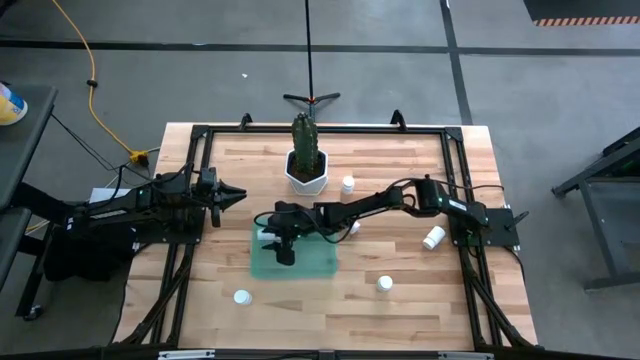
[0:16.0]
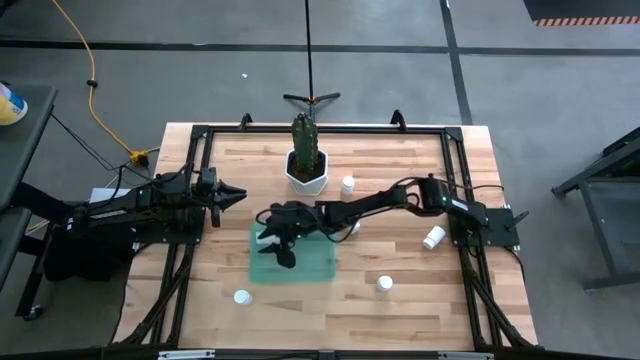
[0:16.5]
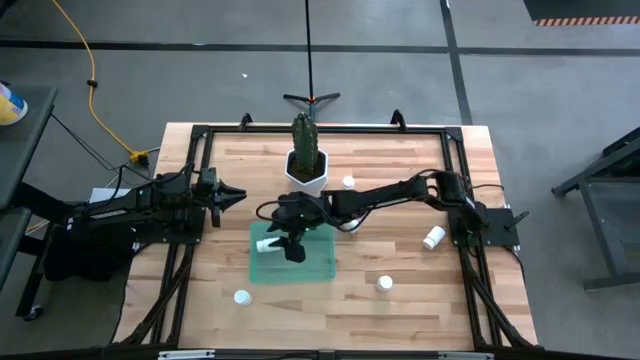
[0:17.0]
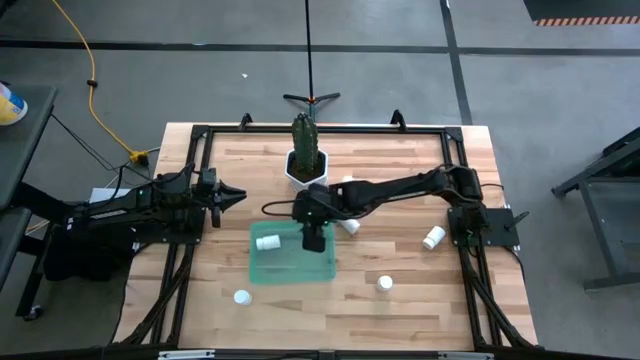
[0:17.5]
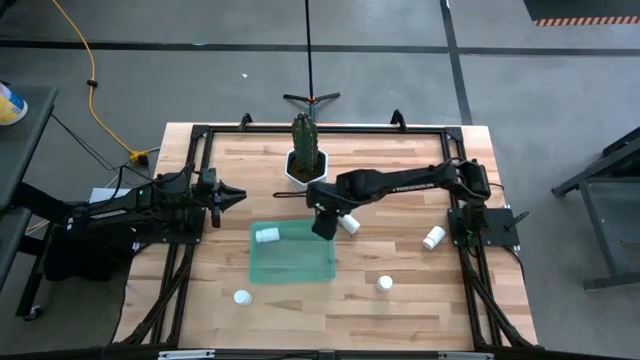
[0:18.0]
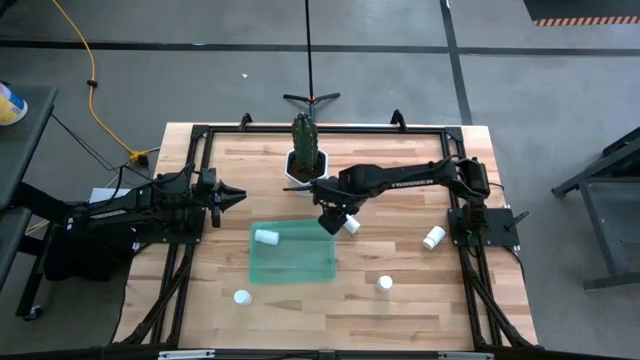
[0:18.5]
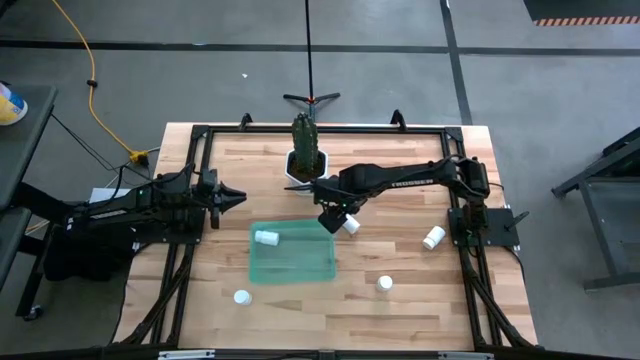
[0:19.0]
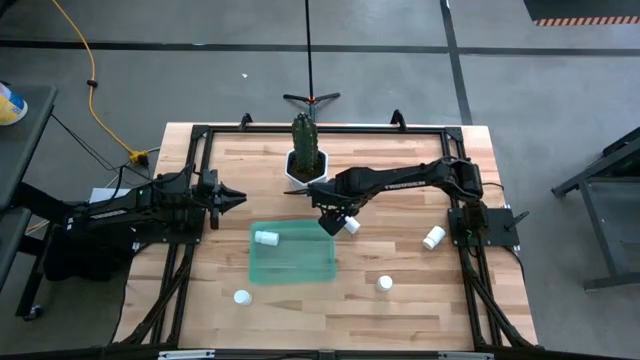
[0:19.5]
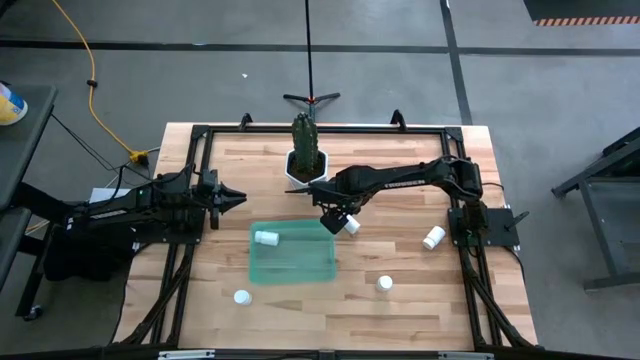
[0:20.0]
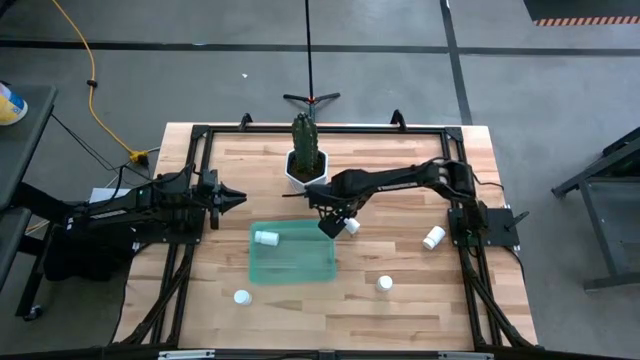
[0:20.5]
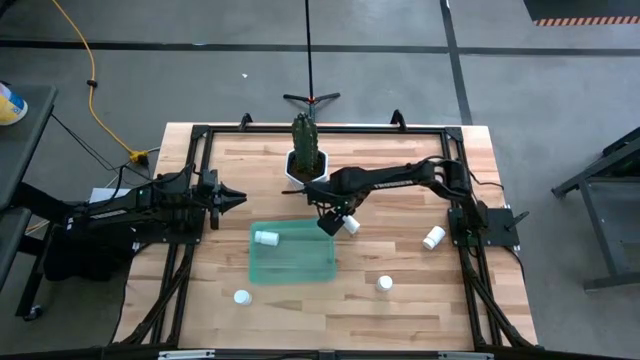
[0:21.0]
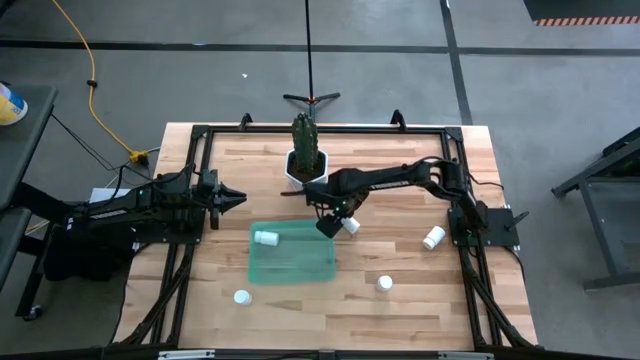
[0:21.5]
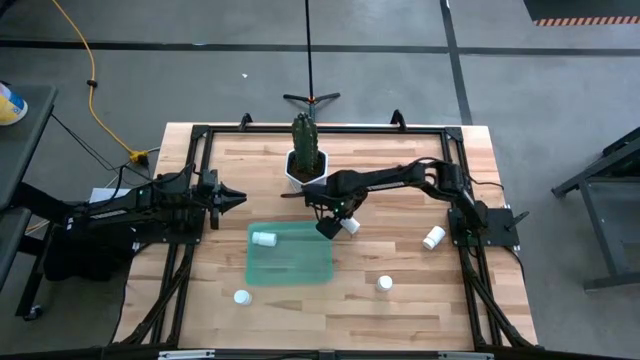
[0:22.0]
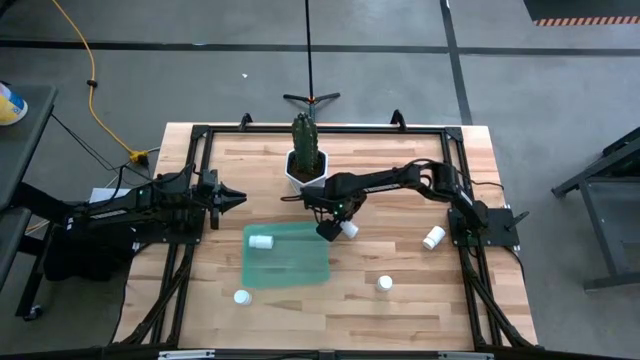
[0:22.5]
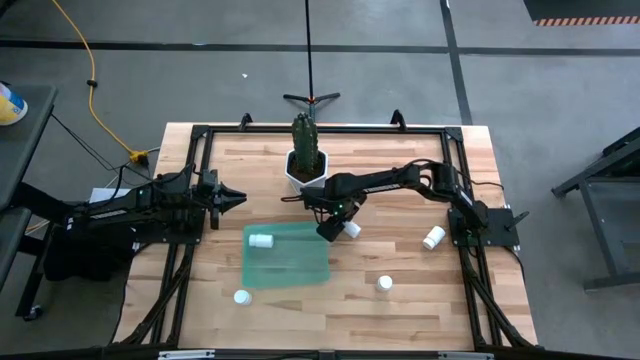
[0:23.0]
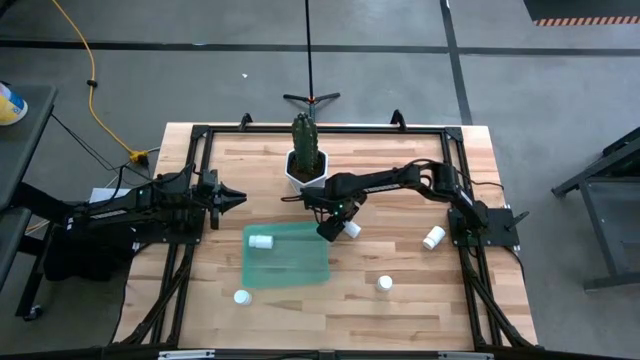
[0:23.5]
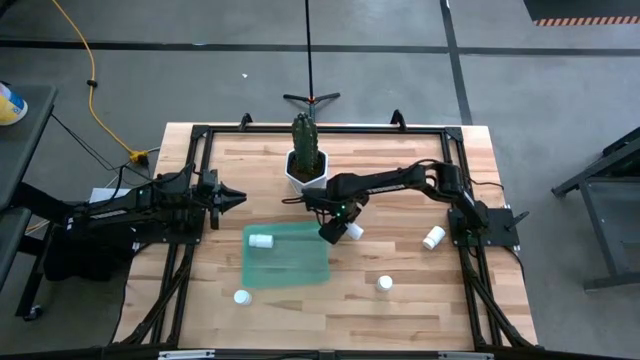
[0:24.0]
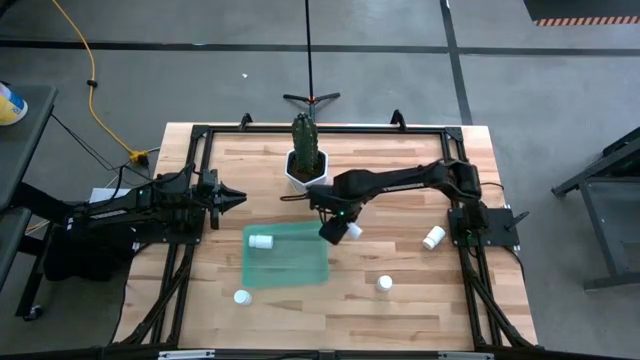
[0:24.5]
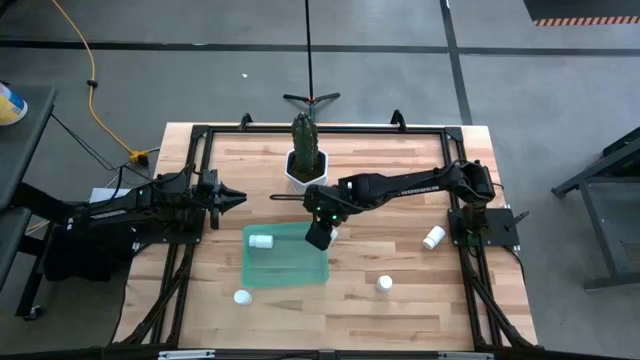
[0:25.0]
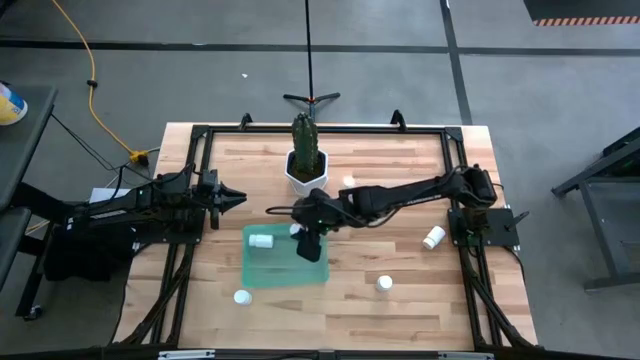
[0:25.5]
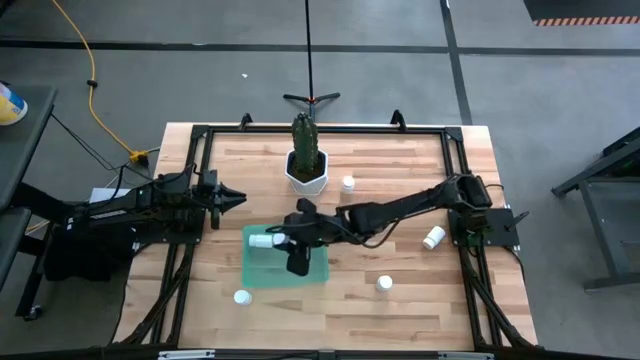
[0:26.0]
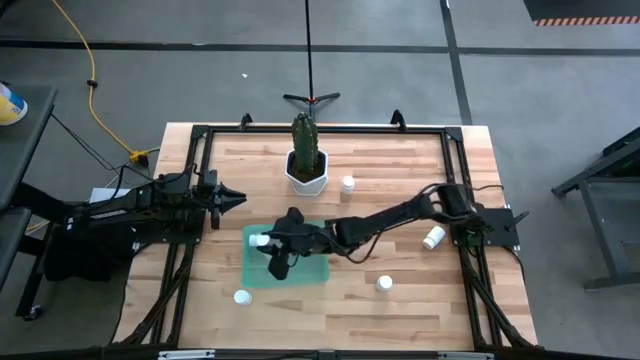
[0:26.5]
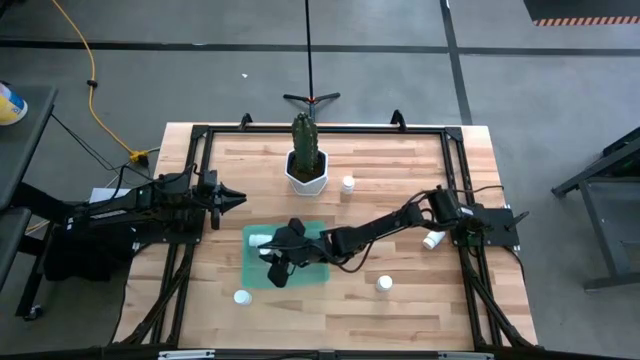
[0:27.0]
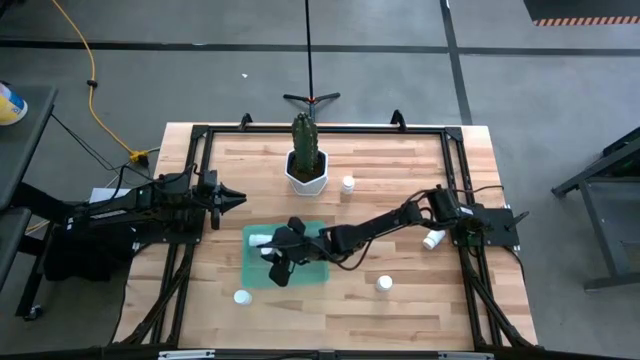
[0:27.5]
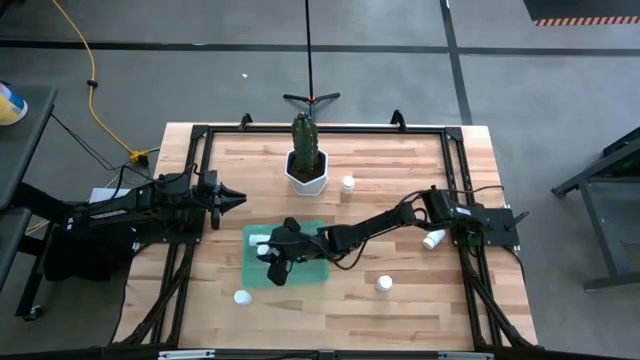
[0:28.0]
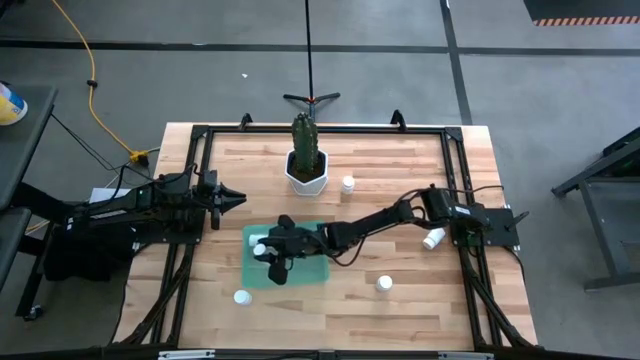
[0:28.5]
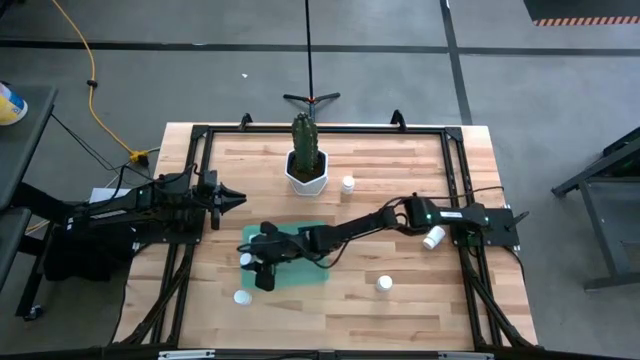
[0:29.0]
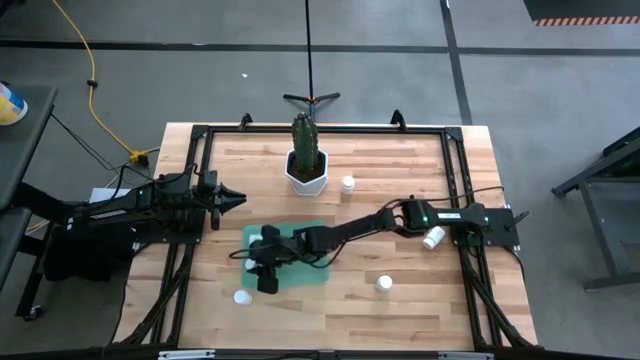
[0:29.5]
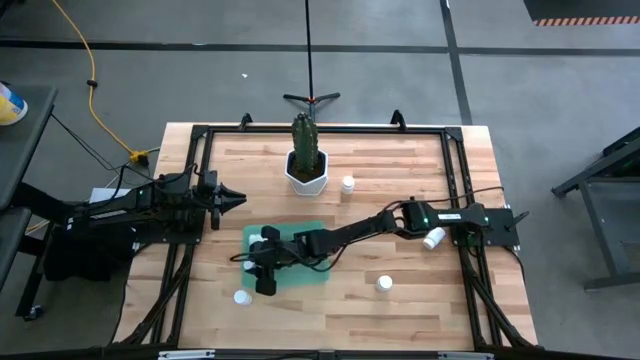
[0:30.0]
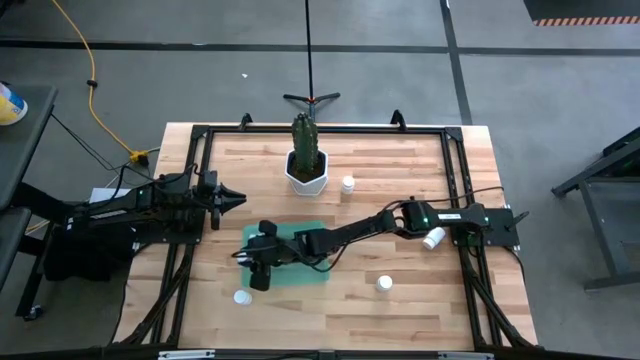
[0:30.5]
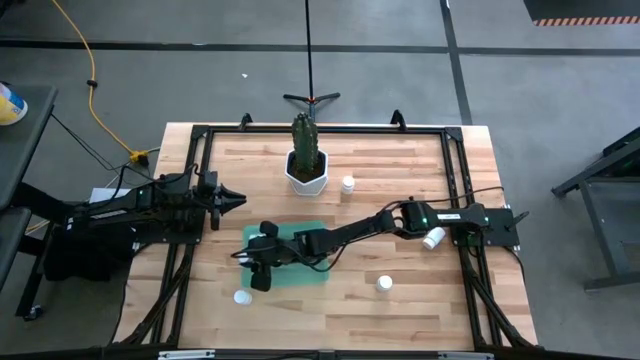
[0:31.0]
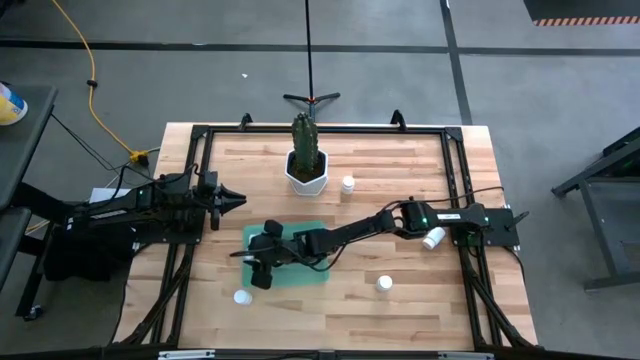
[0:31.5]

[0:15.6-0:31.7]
Task: Pick and place pill bottles into a basket
Put the white pill bottle into the green bin

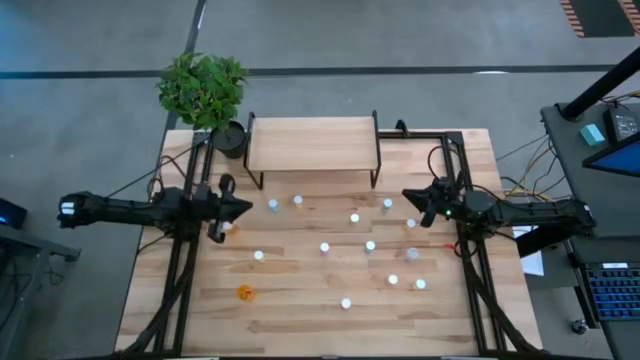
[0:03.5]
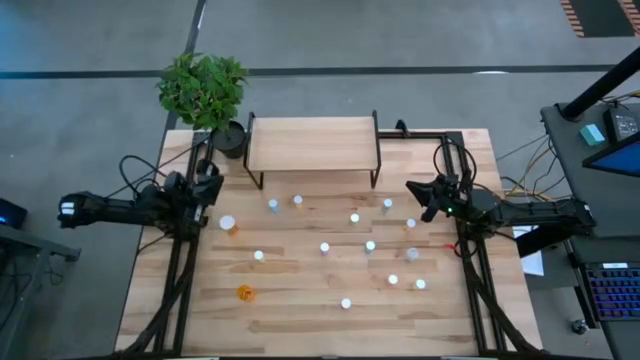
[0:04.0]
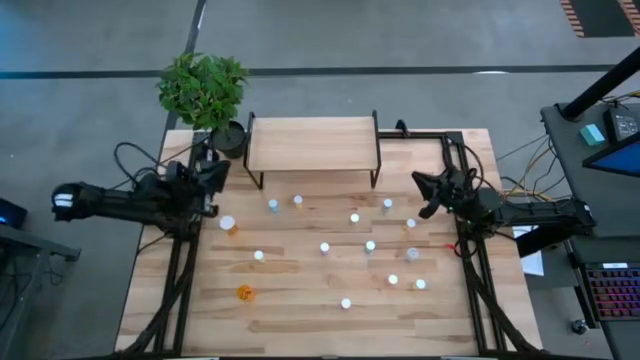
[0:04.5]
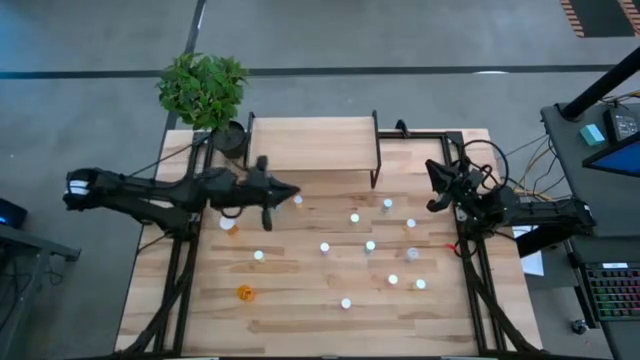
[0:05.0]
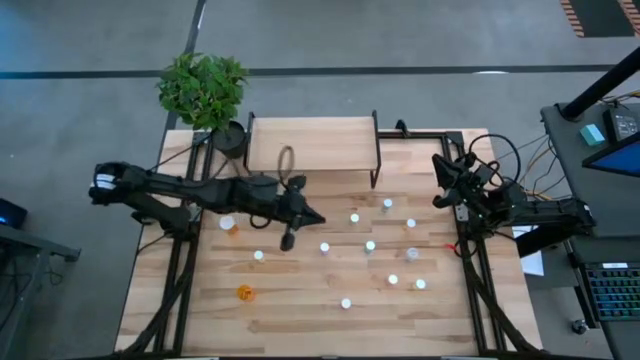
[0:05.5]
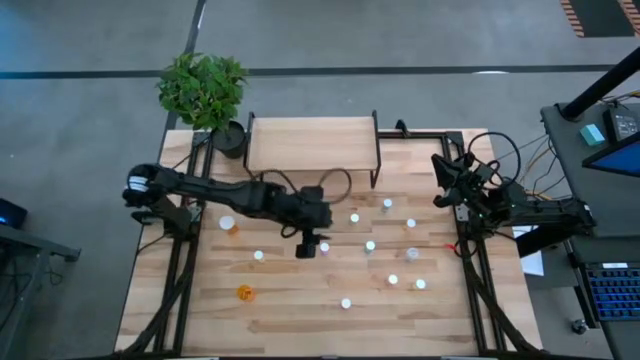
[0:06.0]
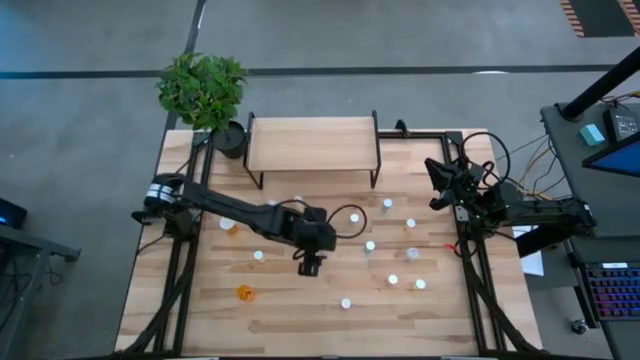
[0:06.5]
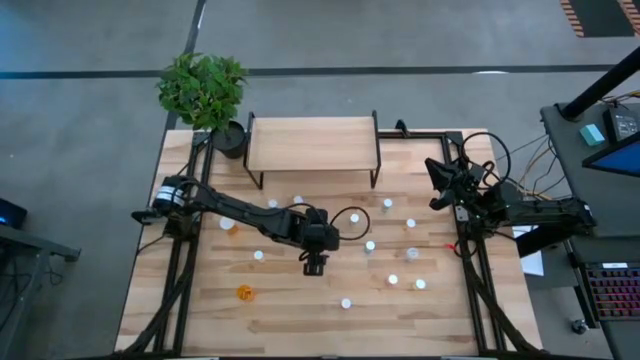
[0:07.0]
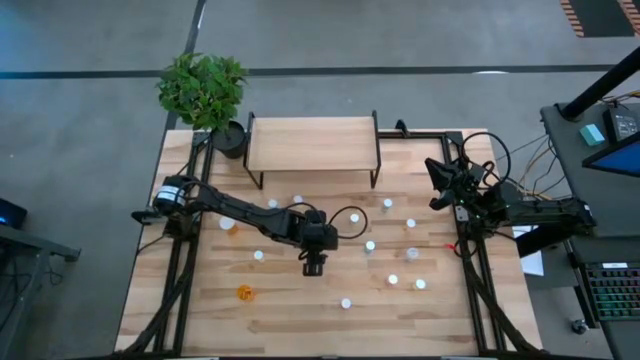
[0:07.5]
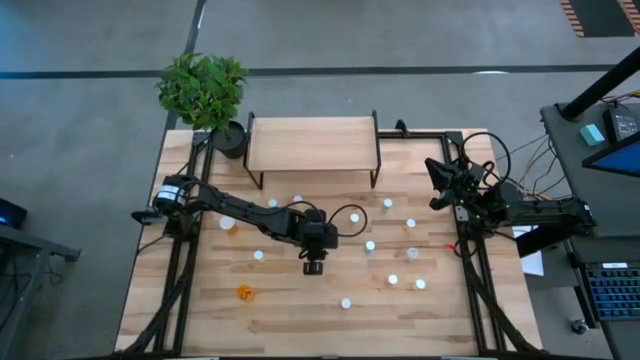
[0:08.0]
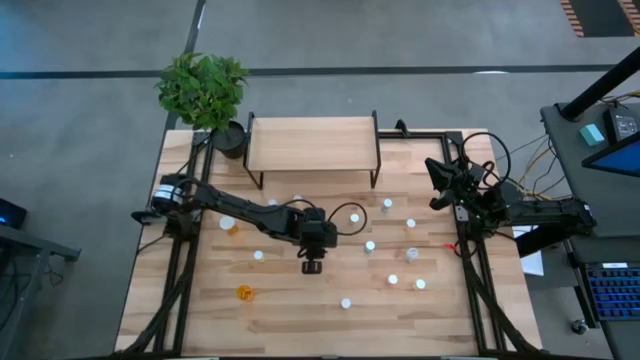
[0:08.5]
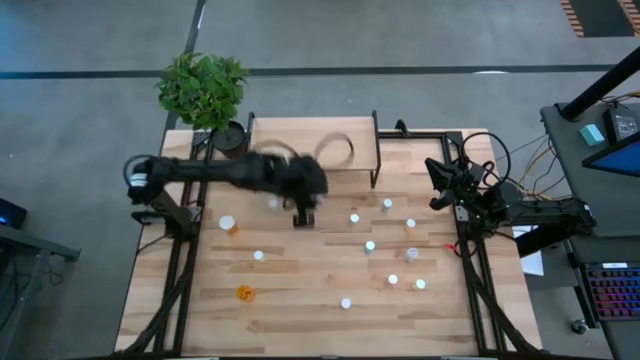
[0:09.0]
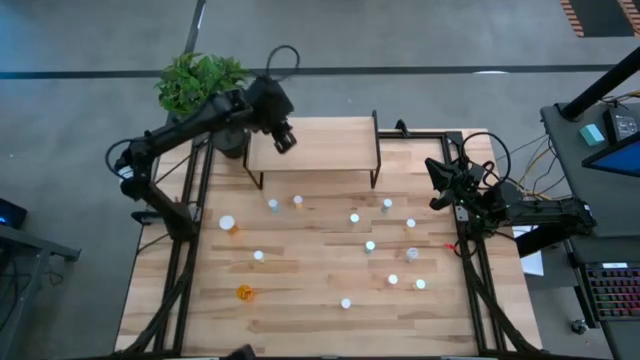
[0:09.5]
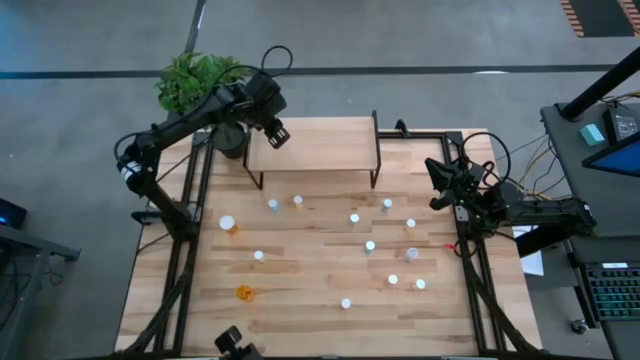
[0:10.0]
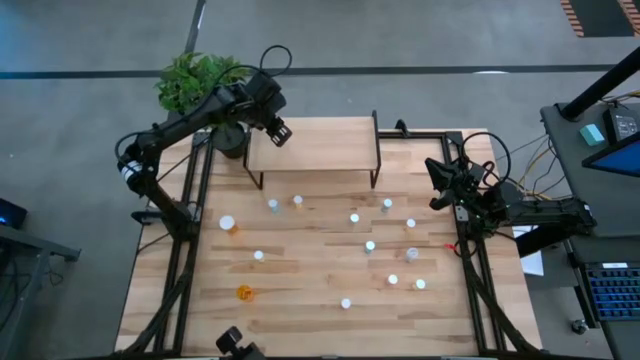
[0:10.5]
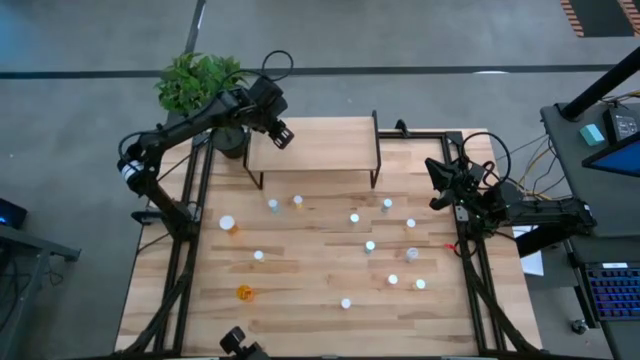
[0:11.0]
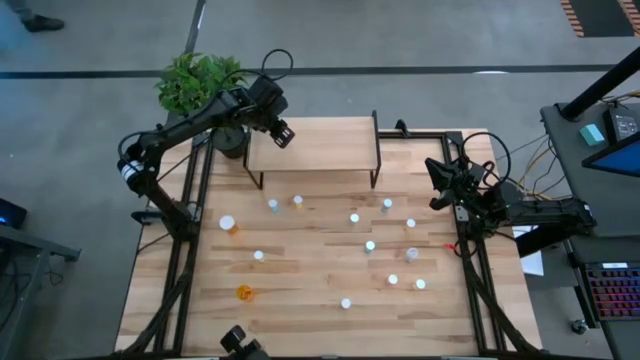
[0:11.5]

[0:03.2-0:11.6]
Task: Pick and place medicine bottles onto shelf by color
Put the violet pill bottle on the shelf
